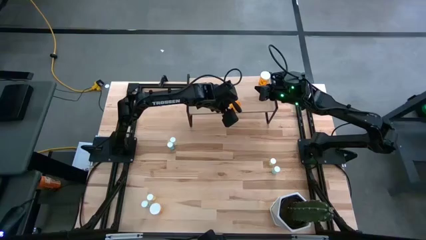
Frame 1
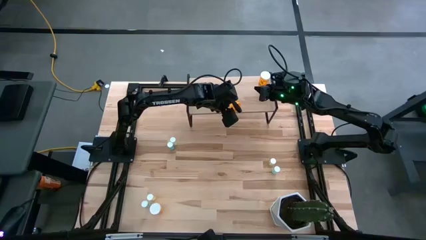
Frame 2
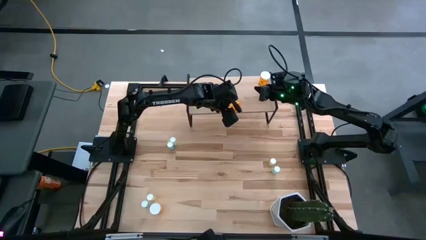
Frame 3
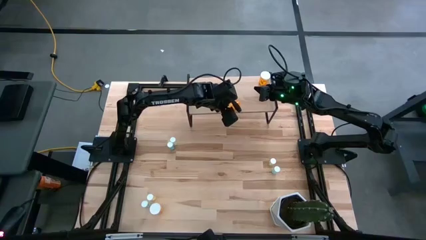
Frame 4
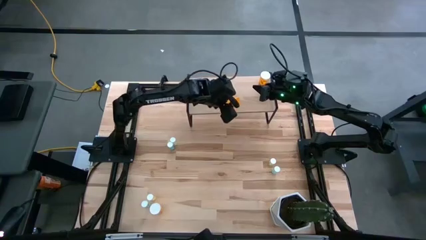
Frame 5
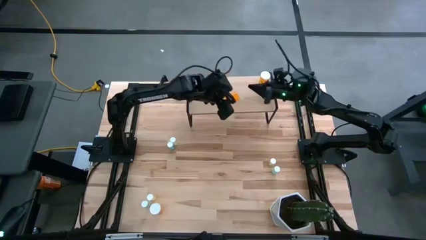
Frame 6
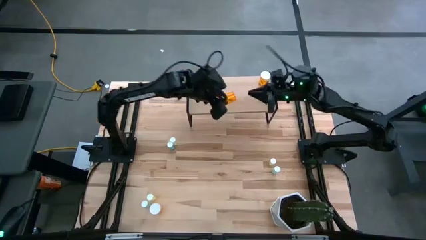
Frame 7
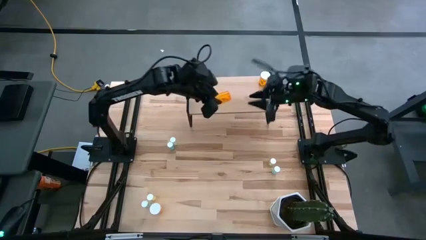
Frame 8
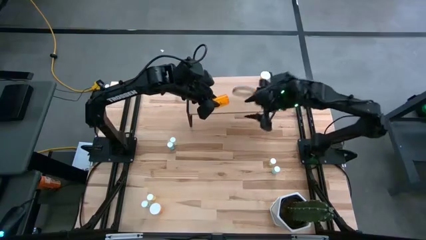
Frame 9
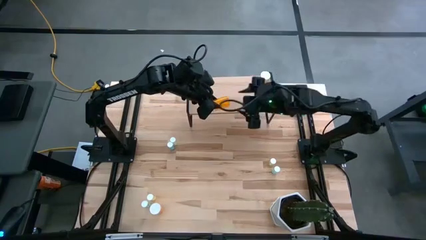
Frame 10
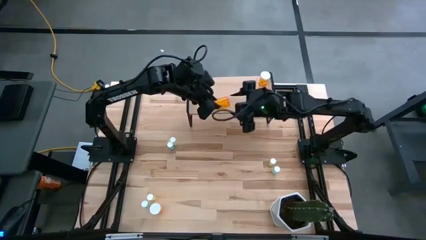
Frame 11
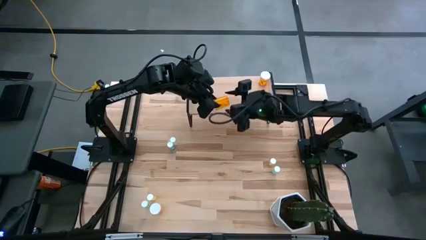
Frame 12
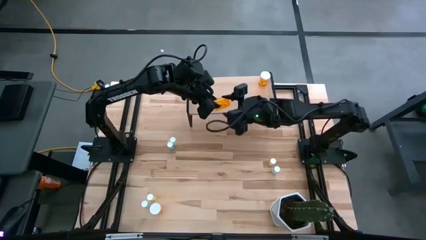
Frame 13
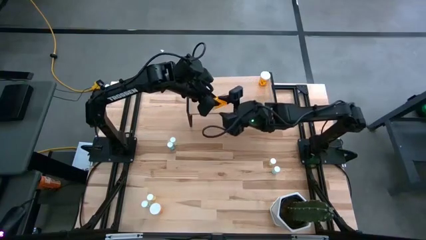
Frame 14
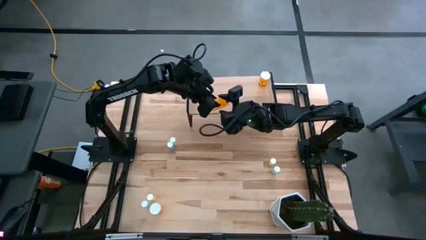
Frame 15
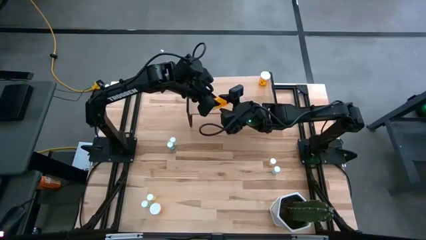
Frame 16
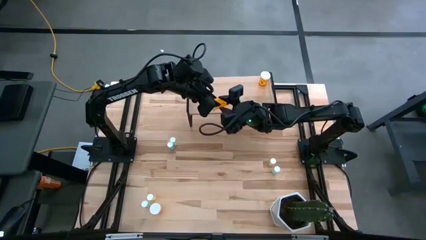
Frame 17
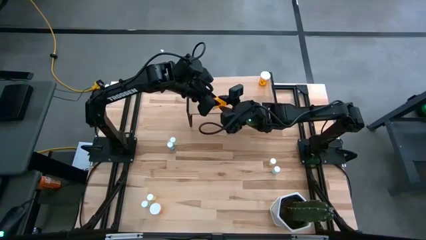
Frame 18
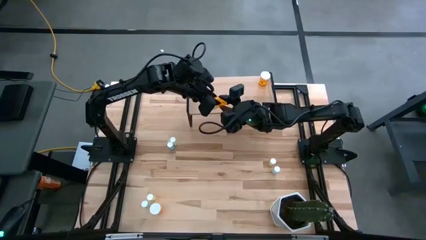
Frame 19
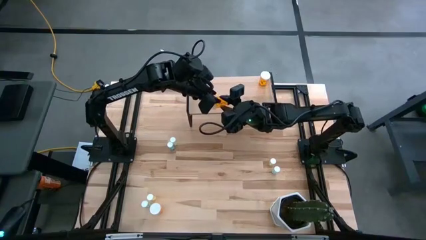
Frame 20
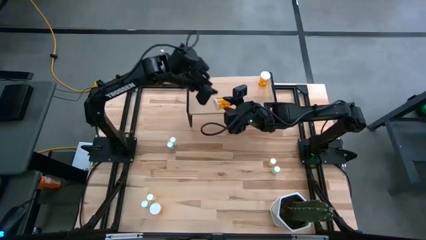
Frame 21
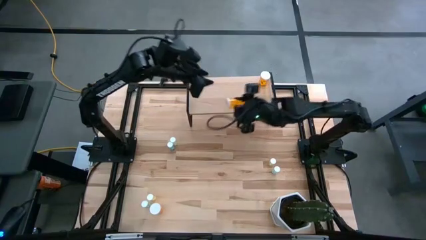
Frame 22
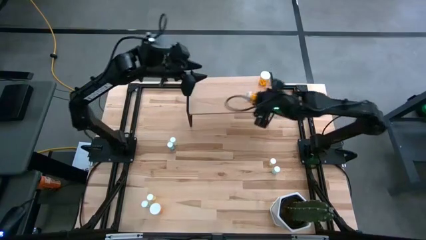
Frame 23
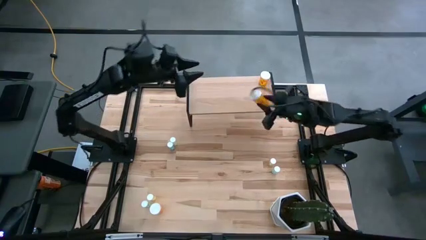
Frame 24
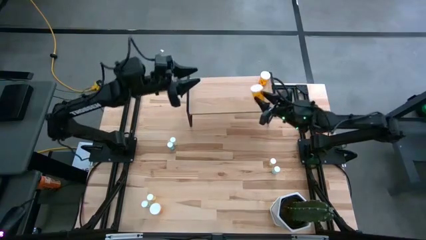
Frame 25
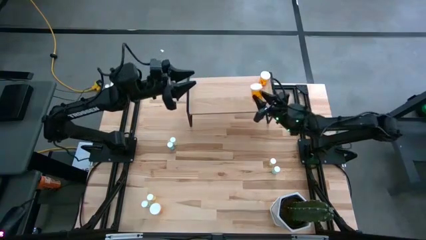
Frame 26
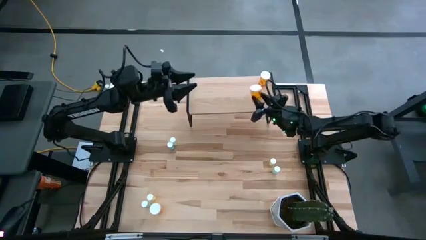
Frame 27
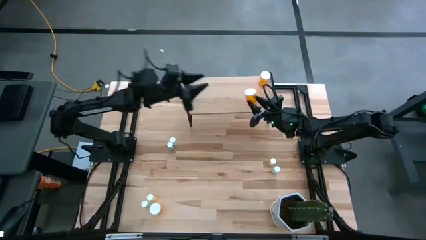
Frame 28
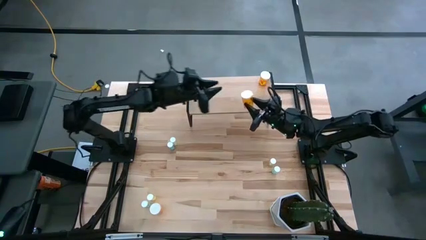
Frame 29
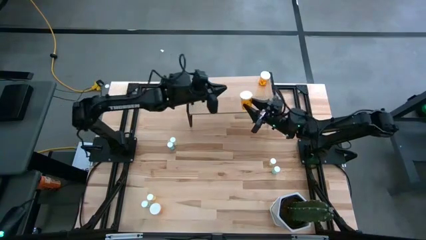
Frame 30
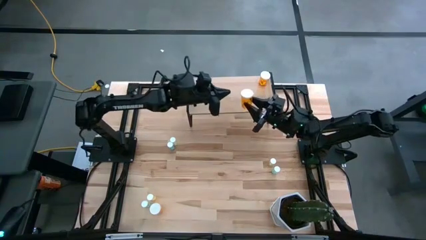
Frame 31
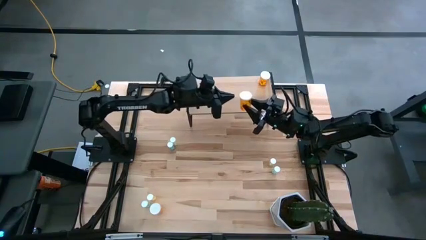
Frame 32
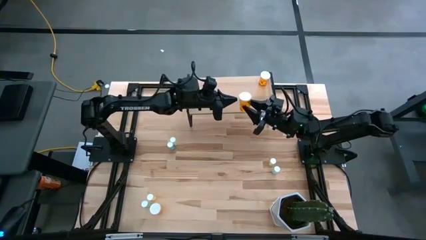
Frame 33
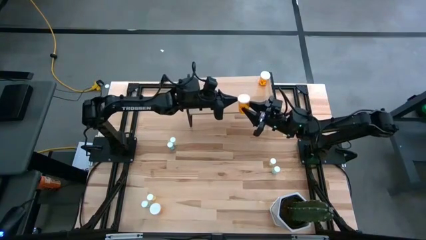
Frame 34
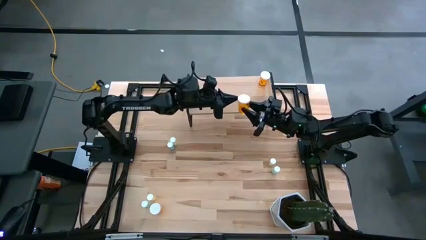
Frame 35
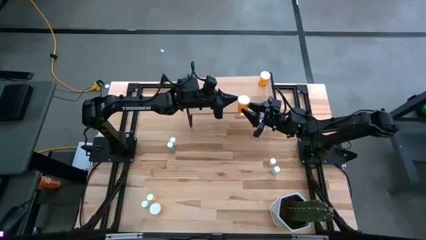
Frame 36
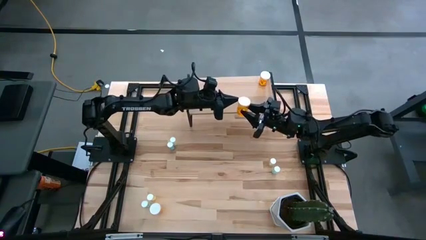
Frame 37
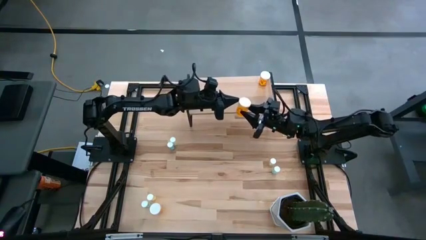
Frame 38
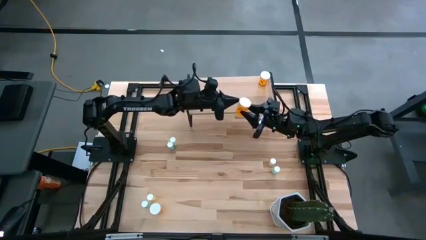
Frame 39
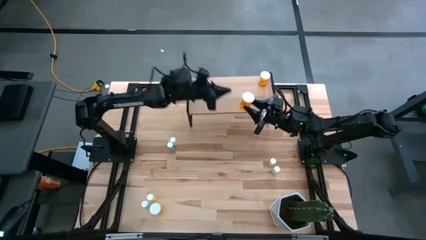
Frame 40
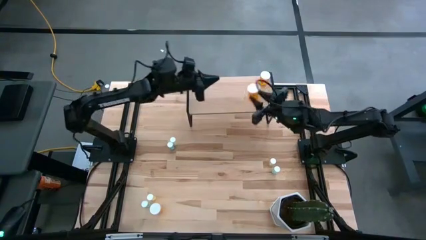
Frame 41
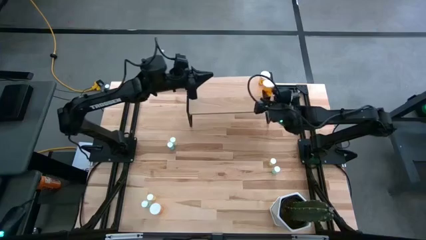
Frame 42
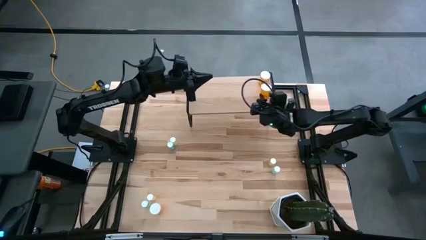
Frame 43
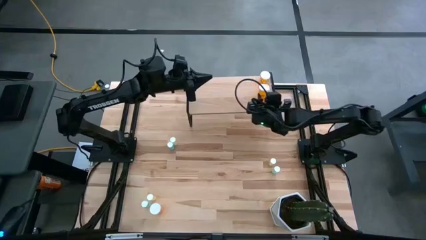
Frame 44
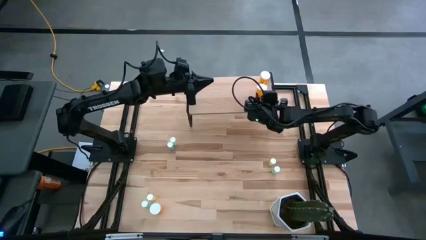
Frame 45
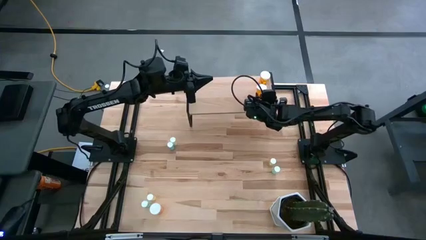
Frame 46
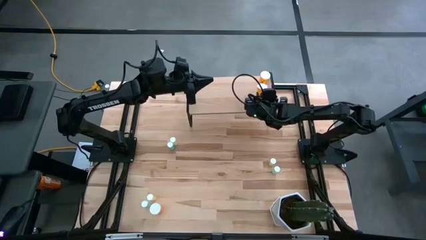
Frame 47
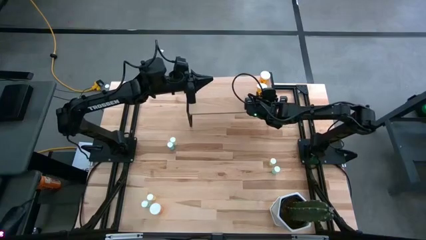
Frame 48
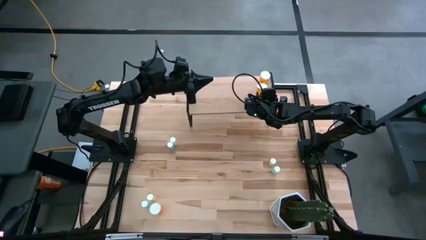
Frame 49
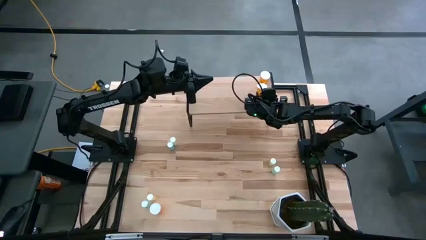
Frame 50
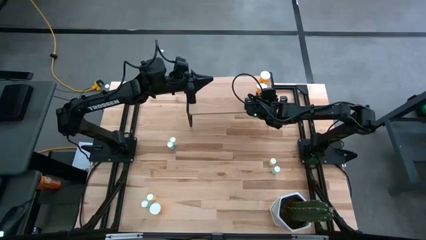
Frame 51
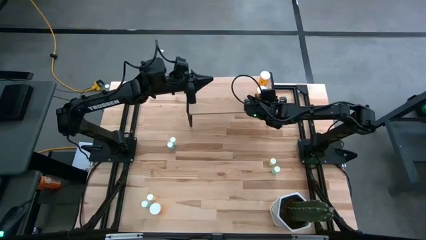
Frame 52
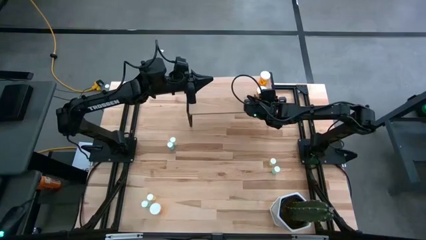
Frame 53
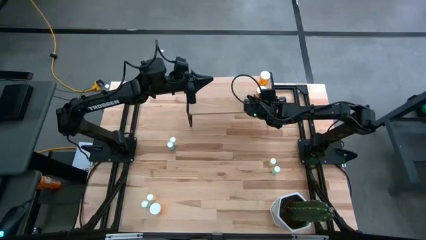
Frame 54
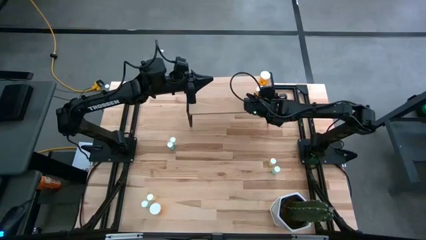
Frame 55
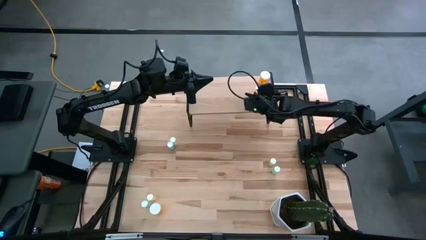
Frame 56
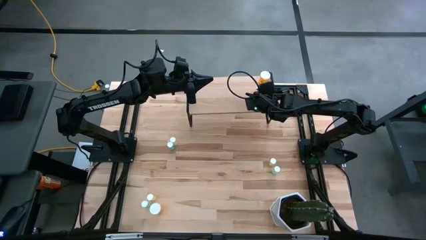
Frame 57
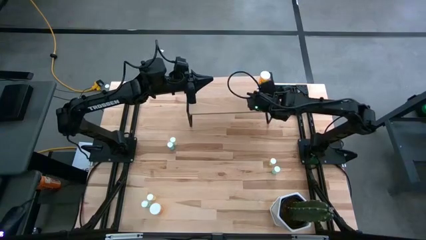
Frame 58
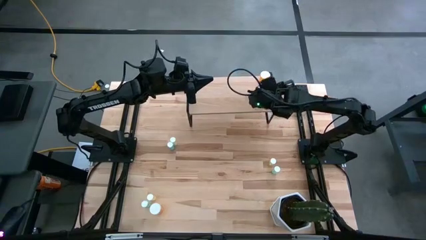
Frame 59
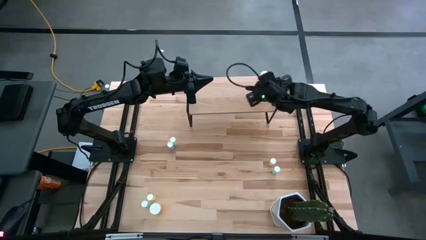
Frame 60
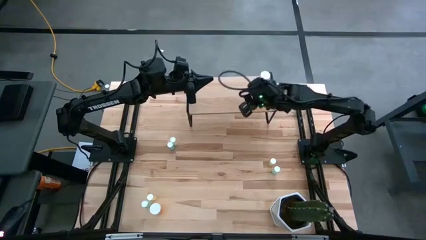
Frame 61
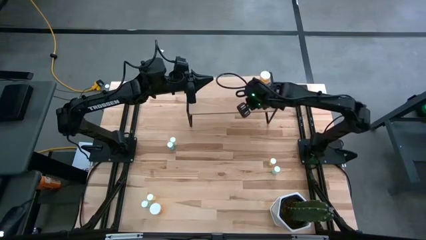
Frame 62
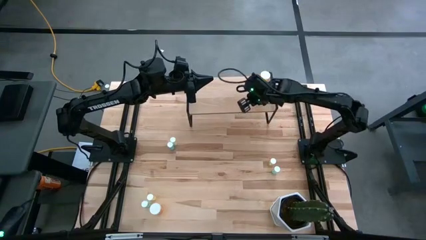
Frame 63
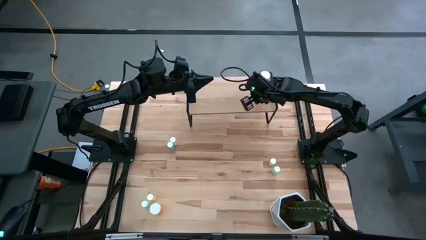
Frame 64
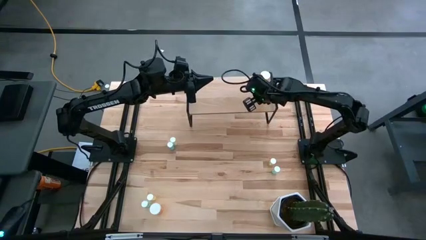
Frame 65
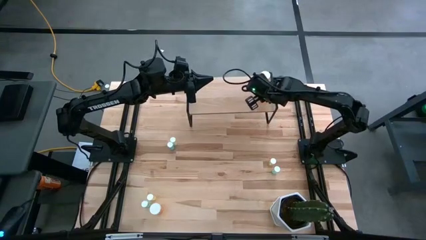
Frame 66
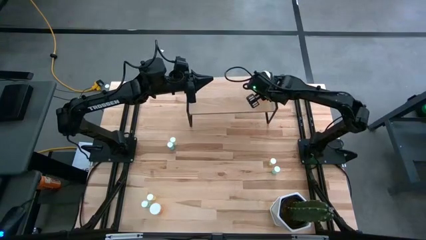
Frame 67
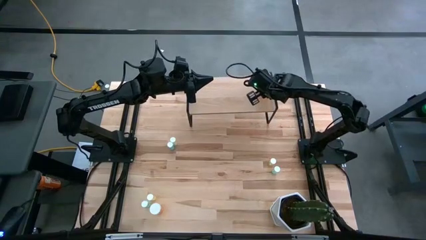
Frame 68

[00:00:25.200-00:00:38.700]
Task: Pick and place medicine bottles onto shelf by color
Put the top orange pill bottle on the shelf aligned with the orange pill bottle
